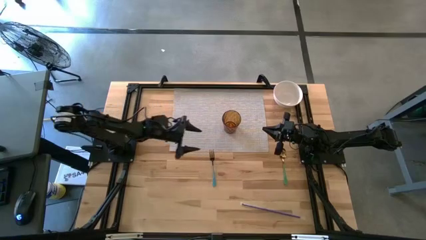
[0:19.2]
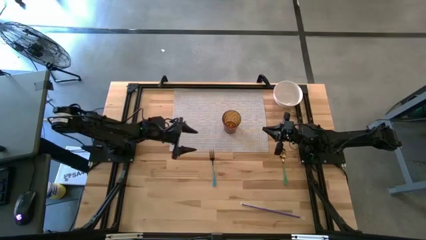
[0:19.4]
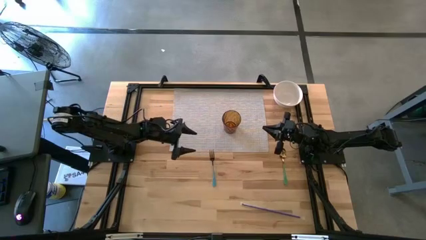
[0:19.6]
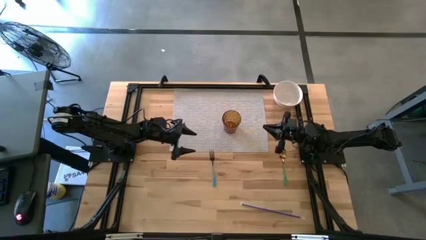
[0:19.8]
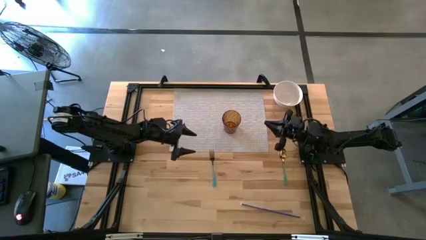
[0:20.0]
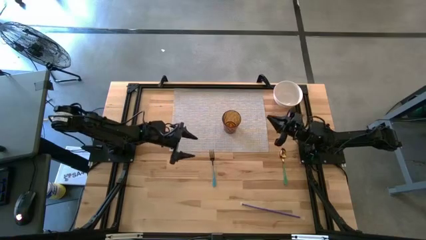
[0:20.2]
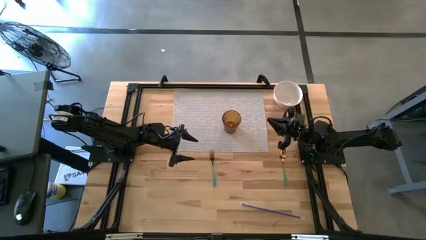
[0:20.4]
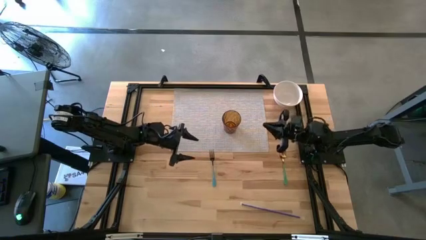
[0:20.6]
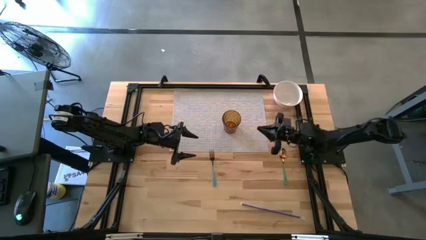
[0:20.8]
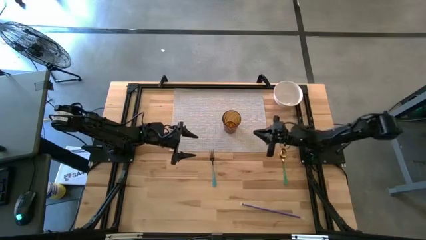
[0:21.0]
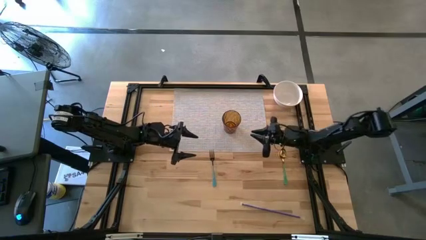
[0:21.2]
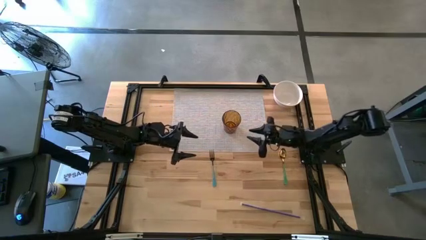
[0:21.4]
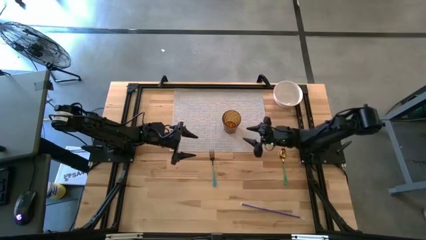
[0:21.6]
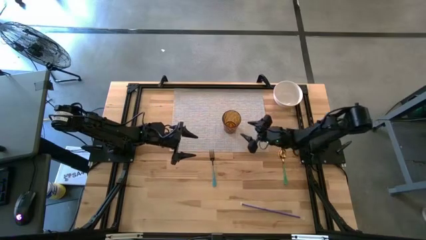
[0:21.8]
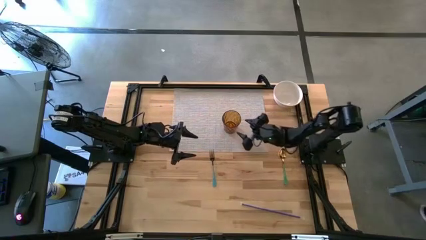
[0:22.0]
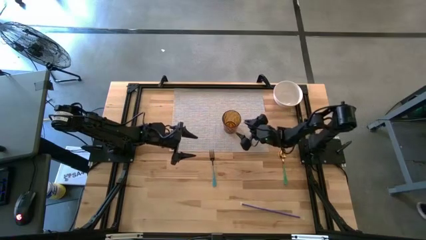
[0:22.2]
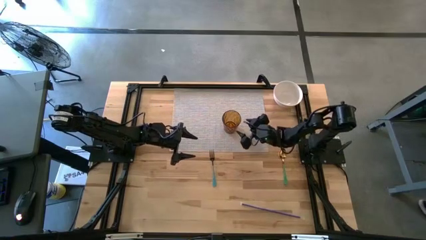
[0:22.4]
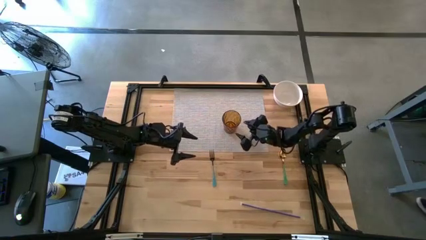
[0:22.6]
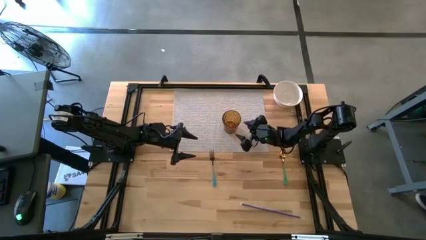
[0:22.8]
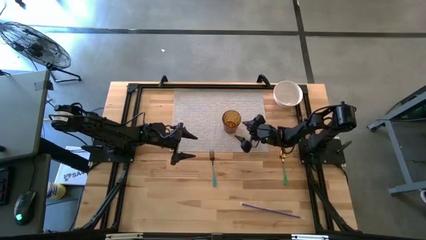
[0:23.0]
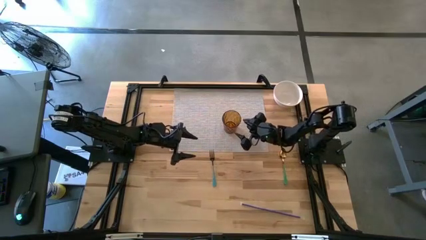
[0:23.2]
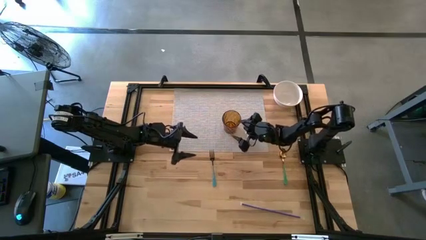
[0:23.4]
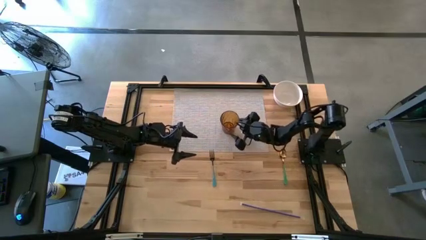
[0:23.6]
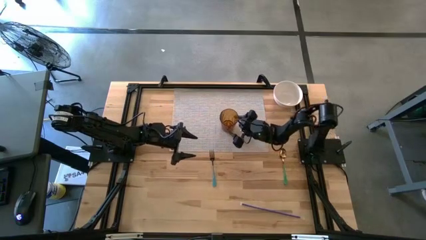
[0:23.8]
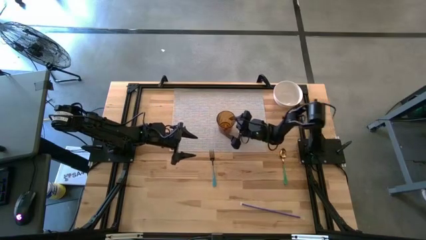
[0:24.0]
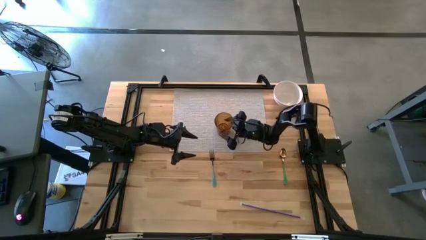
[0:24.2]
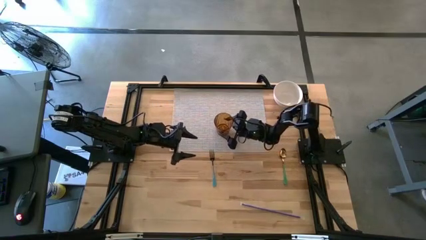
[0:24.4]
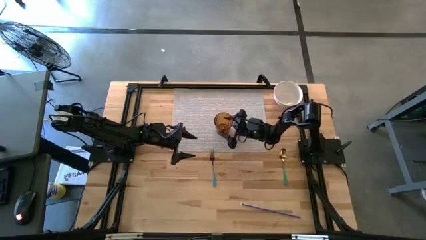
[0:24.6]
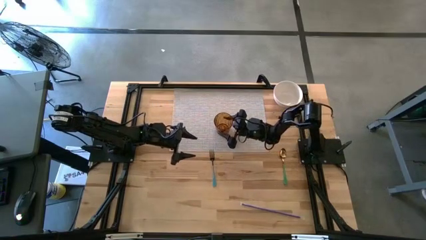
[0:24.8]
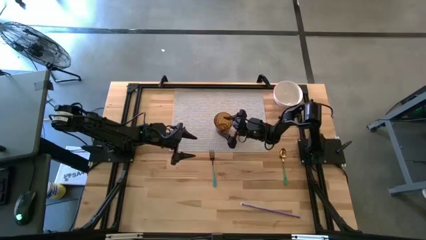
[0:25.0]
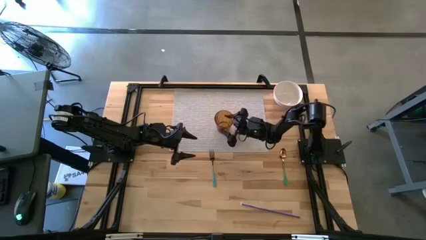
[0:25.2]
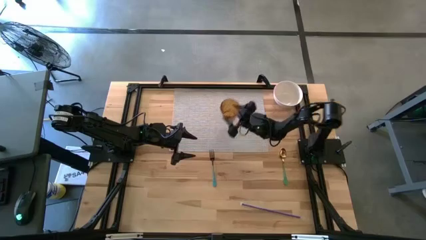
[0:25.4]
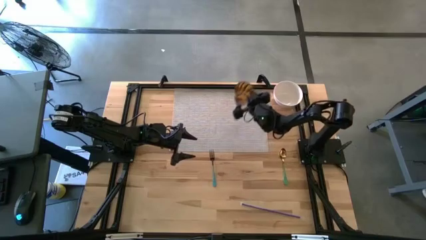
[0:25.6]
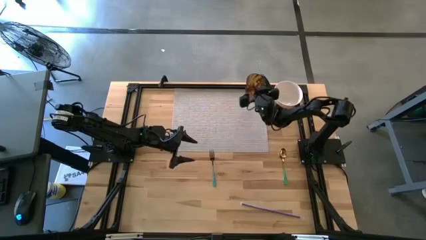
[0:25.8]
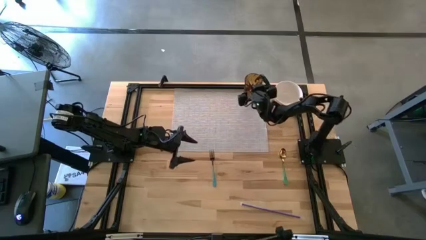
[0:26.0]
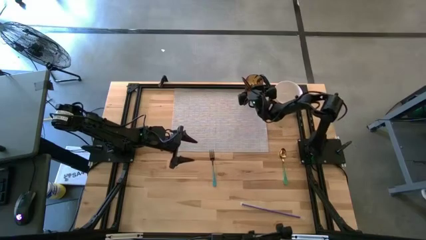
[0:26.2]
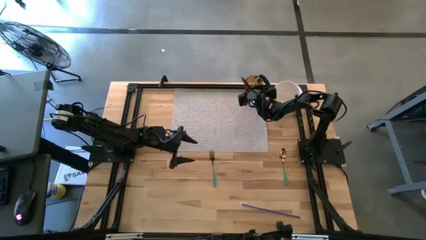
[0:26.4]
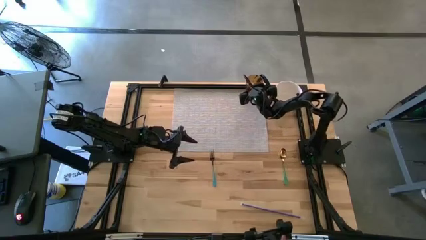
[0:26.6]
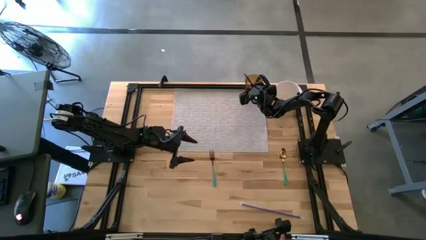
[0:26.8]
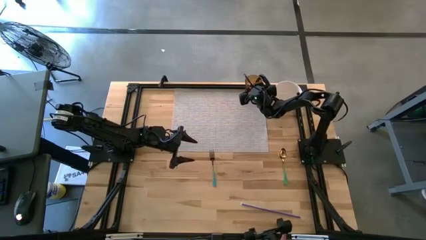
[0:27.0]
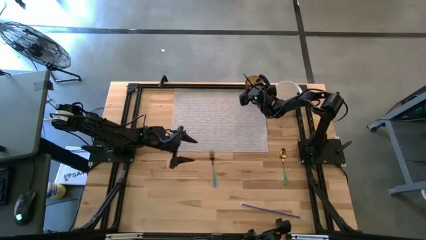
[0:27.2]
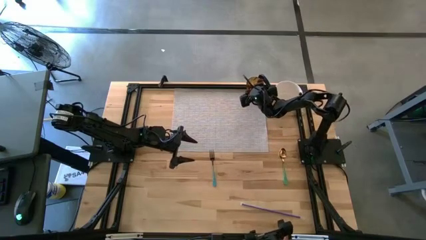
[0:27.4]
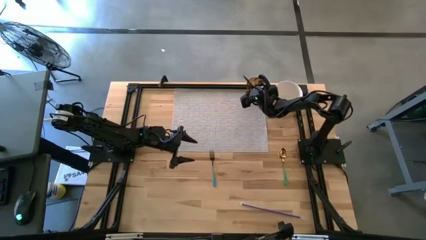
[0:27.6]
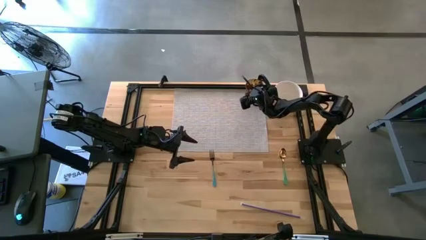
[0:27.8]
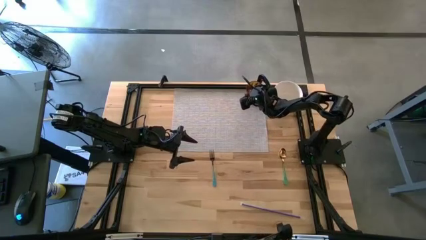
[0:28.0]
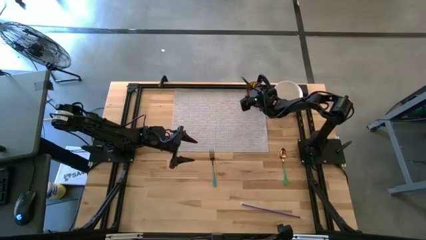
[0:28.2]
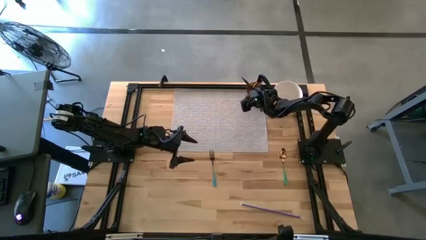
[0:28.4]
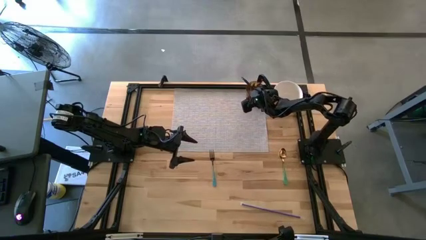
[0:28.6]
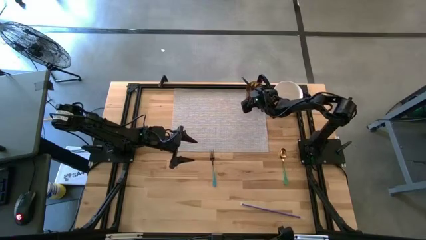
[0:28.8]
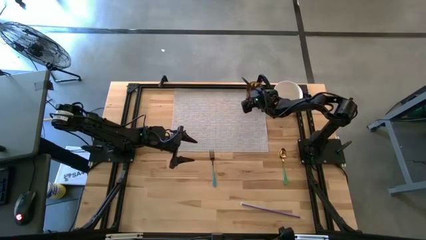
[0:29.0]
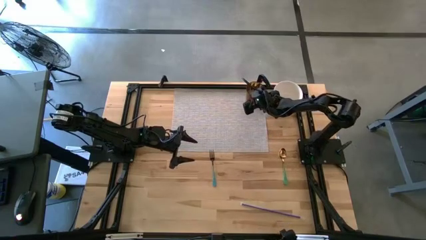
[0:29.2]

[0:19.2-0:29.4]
Task: Pick & Place Utensil
Put the brown cup on the gray mat
